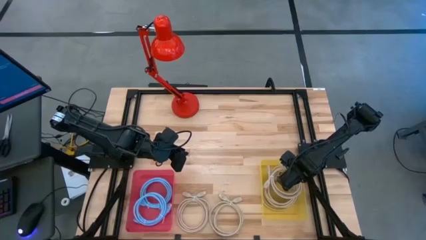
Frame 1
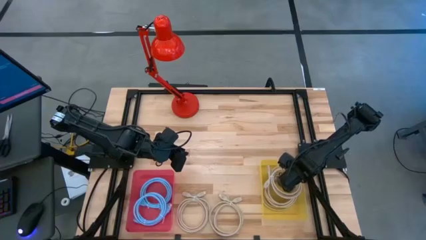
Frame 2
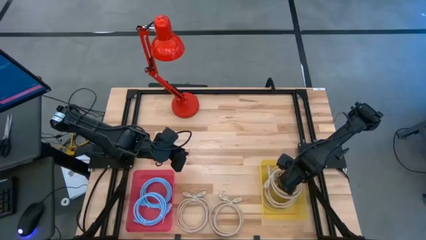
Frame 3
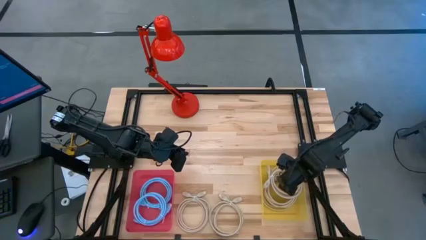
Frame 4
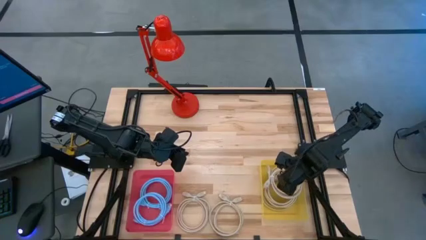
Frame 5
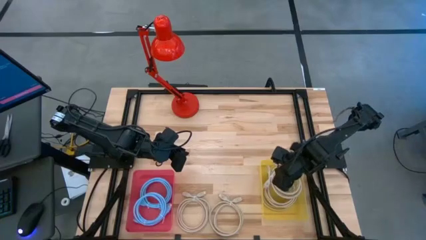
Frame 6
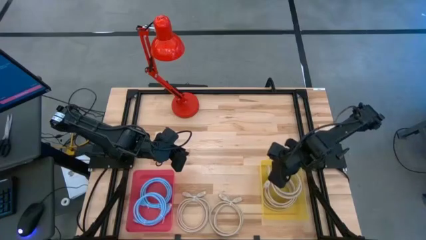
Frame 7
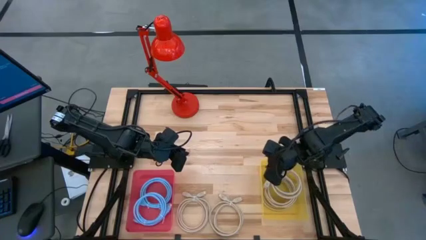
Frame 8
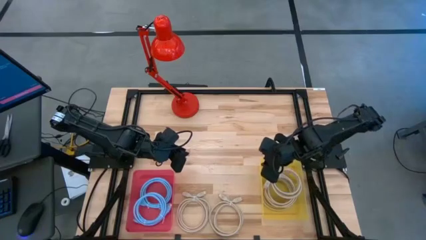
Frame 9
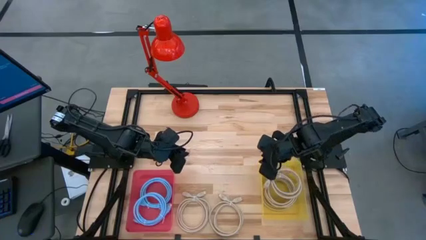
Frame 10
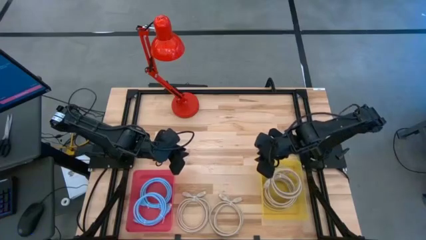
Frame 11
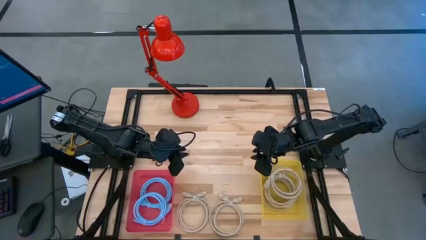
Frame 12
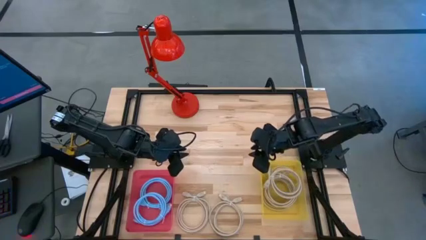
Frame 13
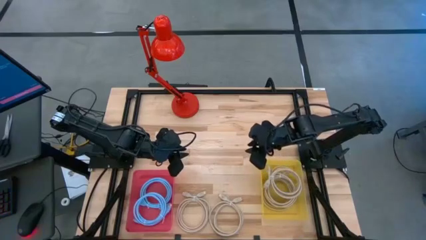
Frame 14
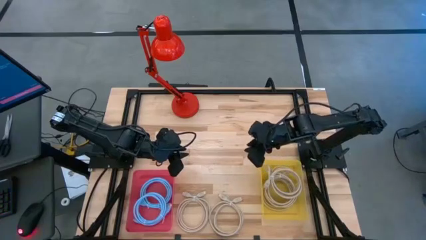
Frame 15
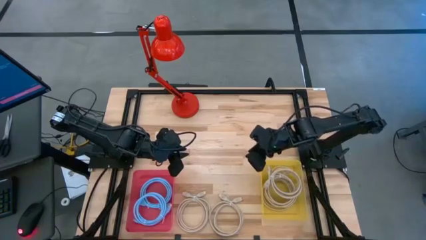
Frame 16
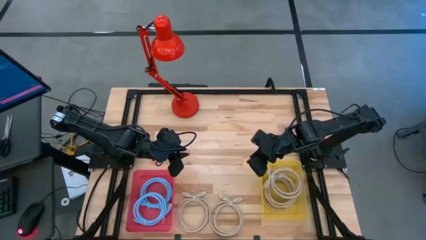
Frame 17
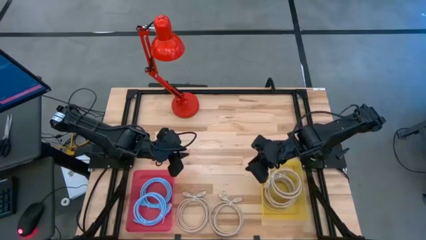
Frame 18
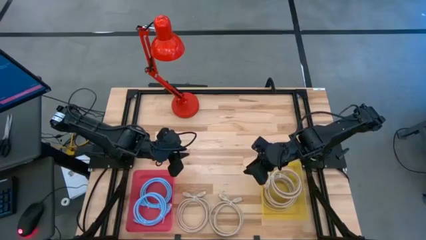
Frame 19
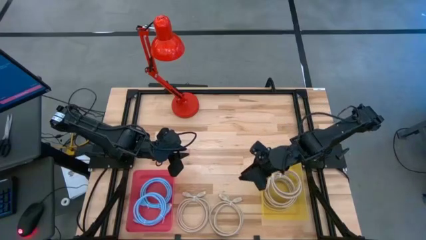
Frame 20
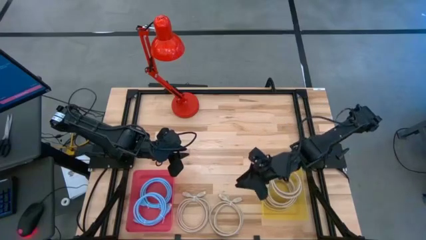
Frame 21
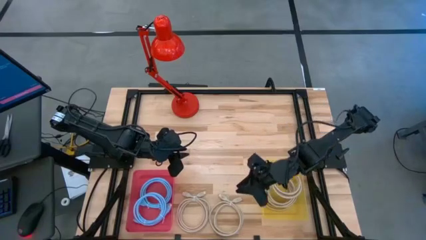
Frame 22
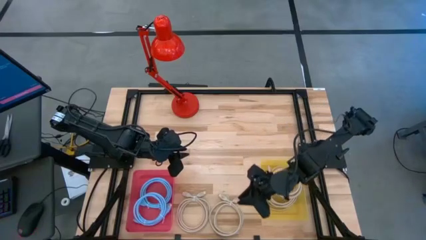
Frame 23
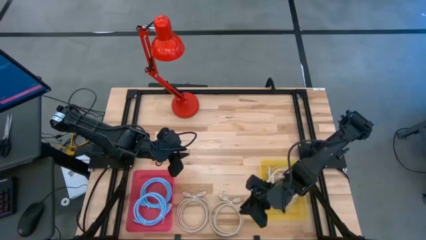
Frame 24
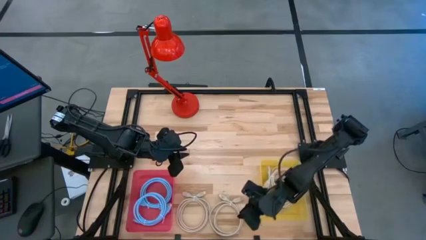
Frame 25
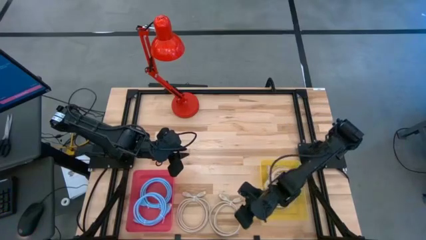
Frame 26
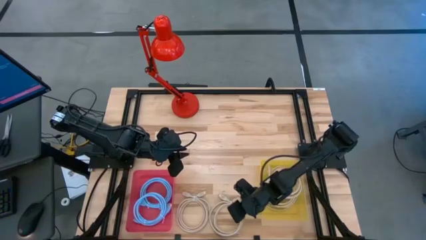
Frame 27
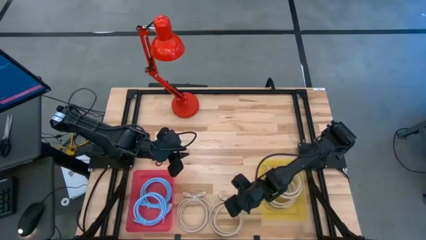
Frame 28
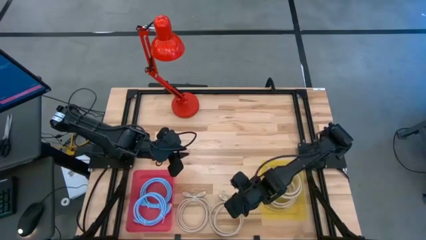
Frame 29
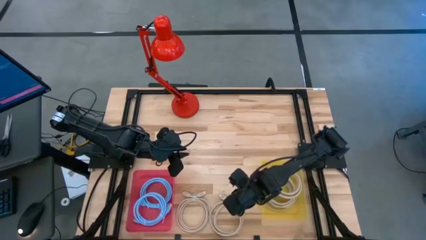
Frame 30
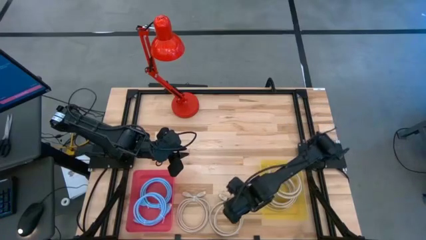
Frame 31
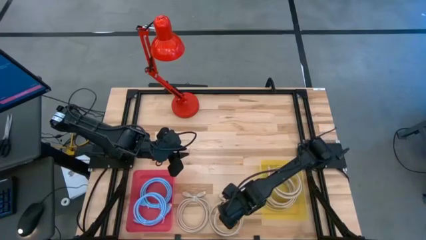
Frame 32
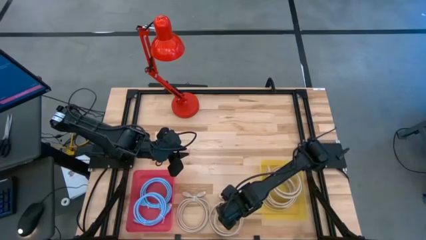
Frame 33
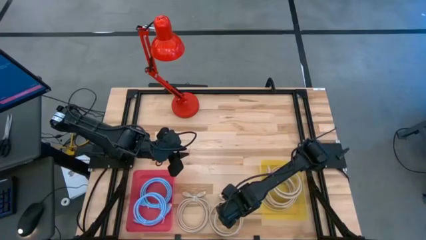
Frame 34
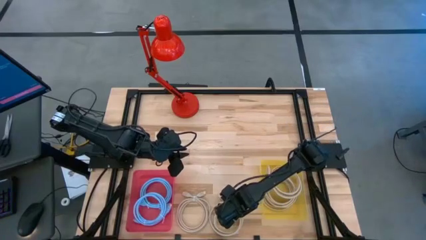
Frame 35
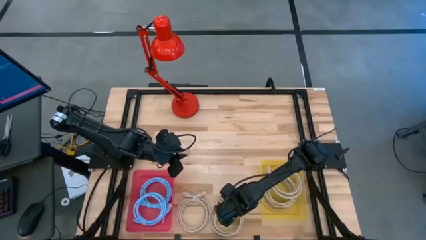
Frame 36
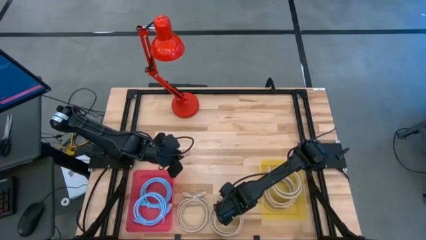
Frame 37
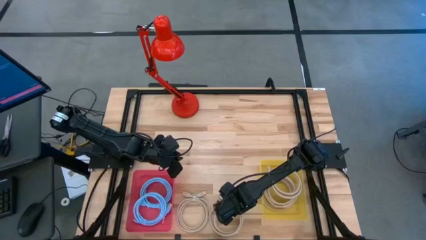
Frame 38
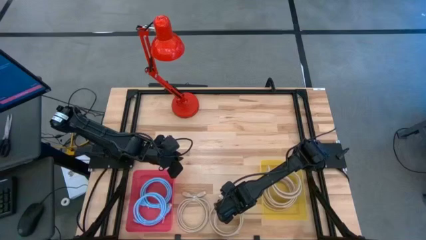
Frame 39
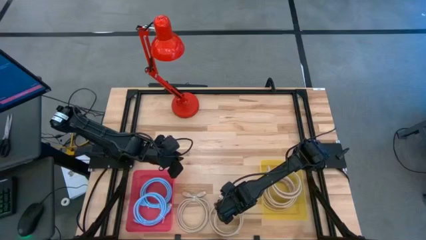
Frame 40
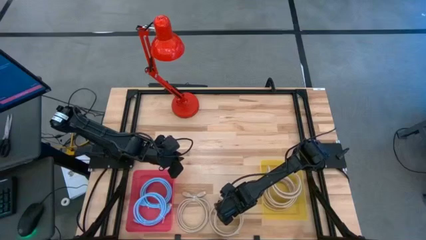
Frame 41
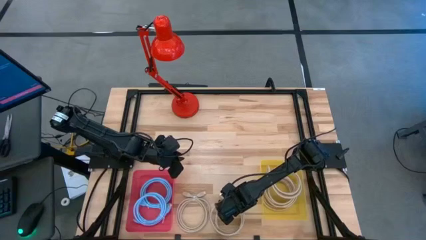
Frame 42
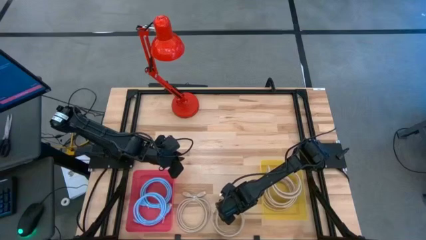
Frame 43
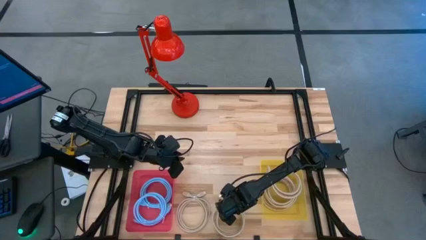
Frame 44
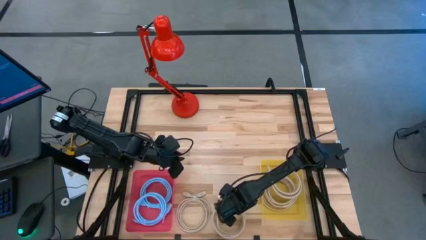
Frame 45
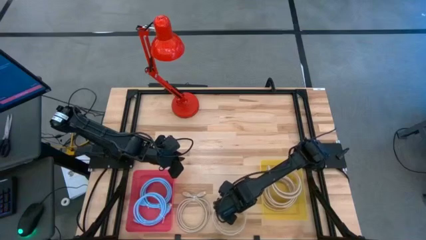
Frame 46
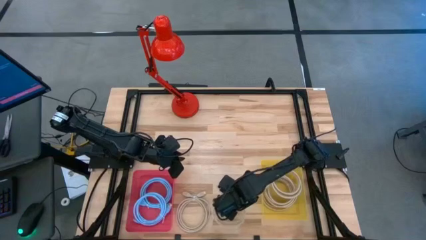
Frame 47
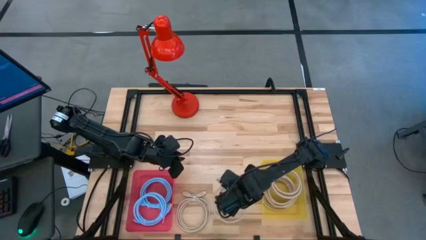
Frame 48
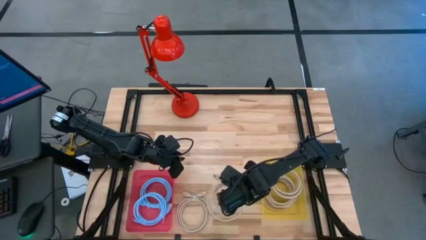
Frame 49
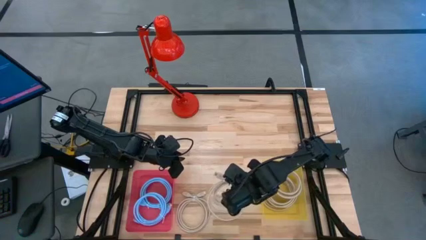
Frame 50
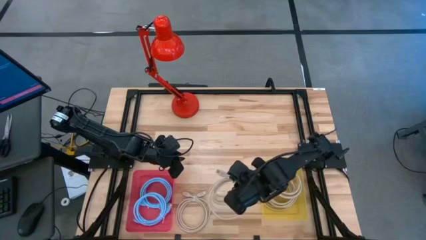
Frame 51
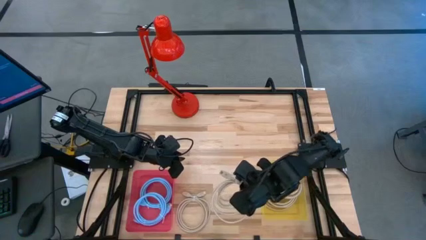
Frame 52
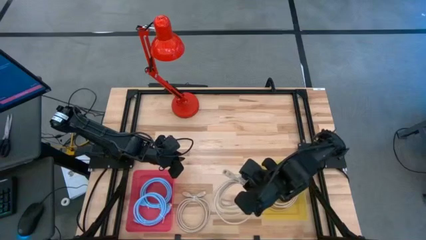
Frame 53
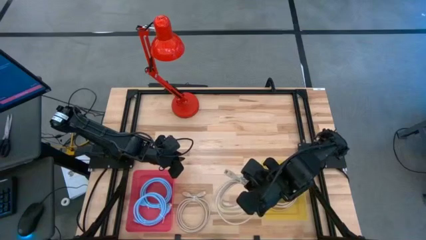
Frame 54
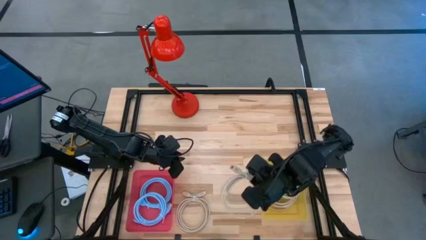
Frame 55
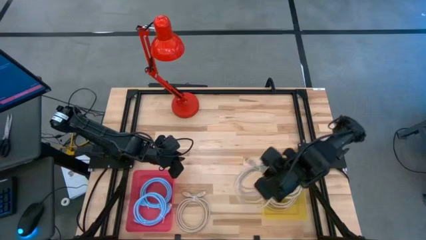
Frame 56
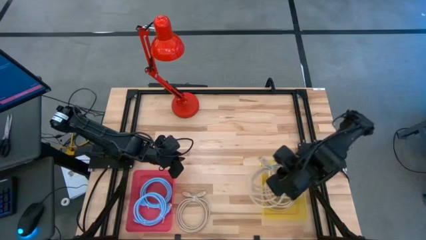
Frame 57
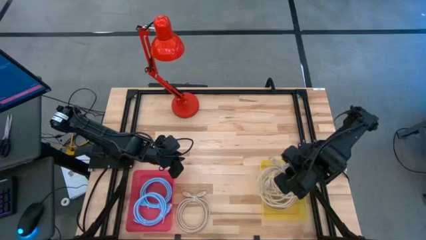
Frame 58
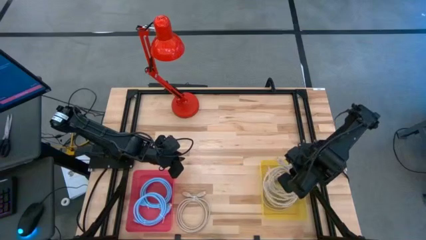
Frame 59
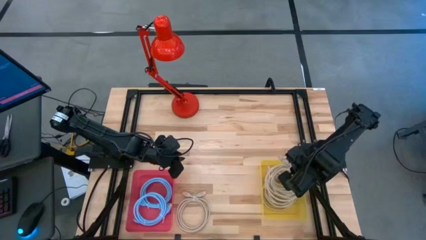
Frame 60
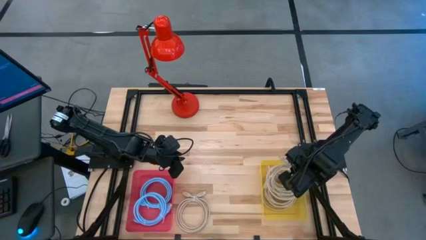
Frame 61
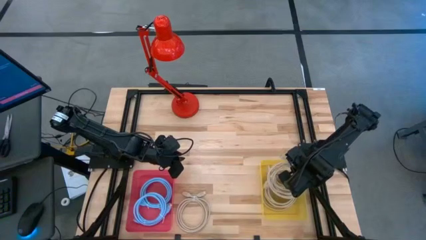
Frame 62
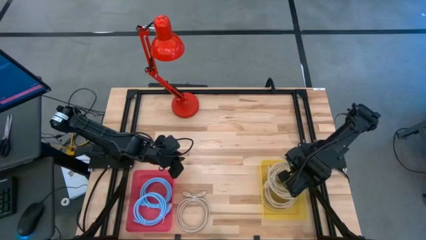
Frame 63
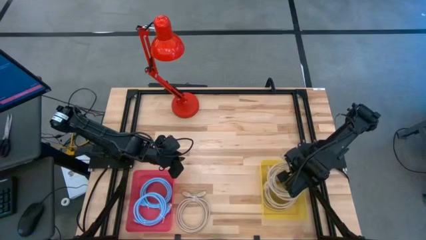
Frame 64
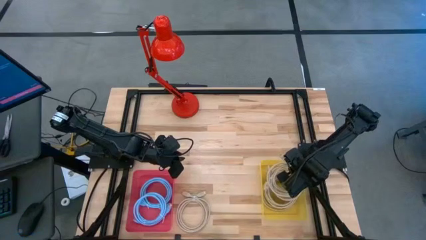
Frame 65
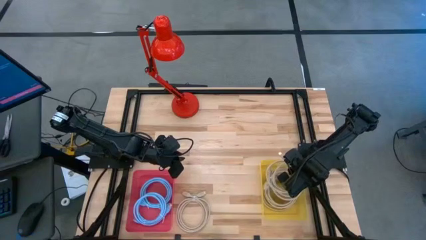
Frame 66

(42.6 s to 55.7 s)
Task: Pick & Place USB Port
Put the light yellow charger cable into the yellow bin
